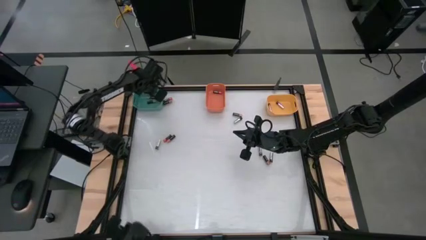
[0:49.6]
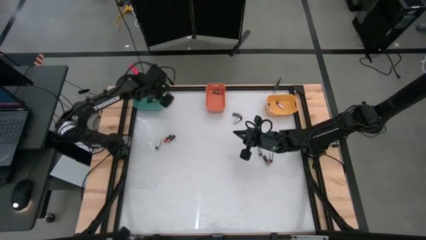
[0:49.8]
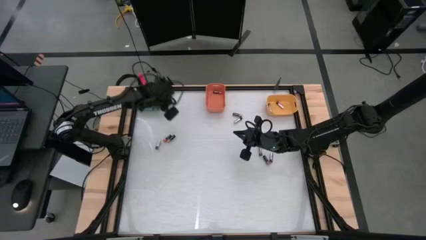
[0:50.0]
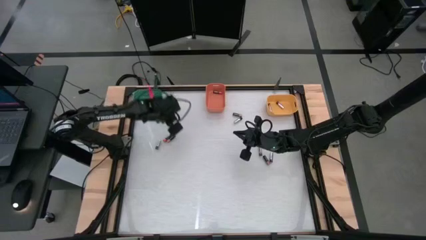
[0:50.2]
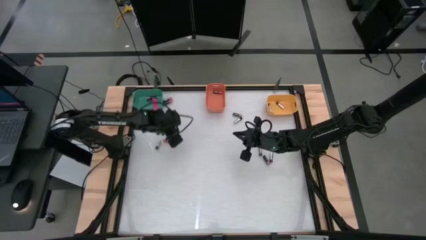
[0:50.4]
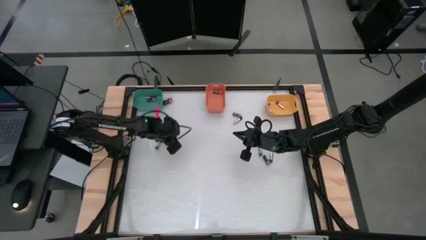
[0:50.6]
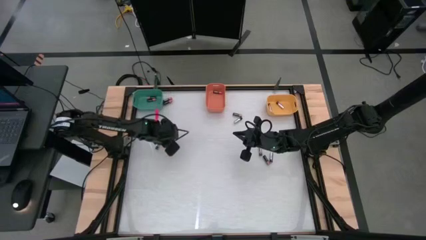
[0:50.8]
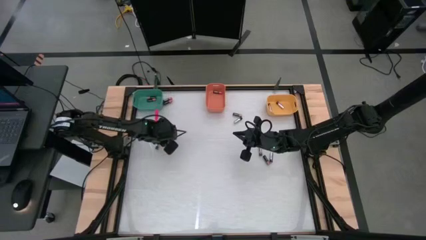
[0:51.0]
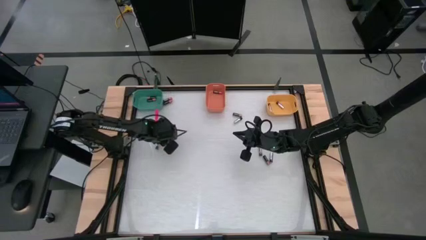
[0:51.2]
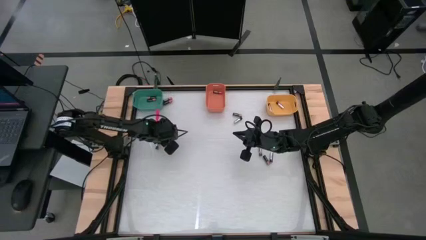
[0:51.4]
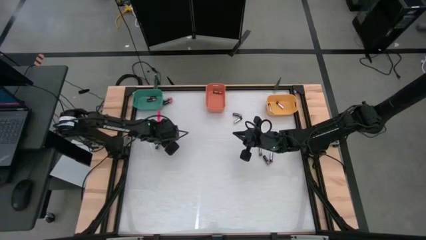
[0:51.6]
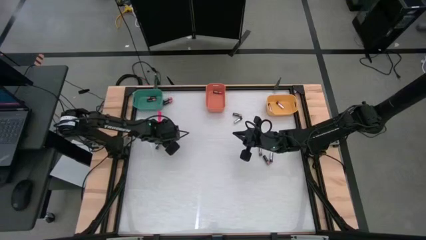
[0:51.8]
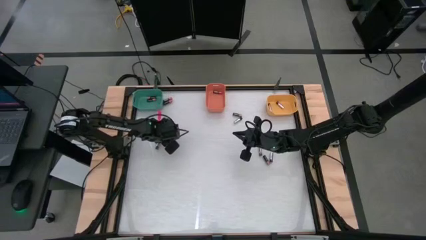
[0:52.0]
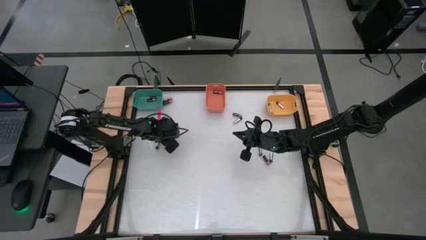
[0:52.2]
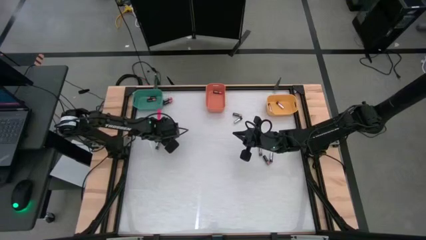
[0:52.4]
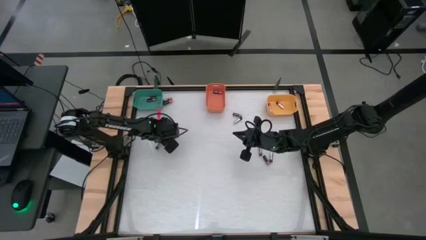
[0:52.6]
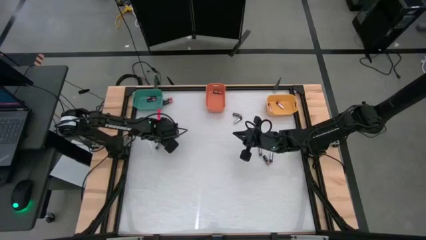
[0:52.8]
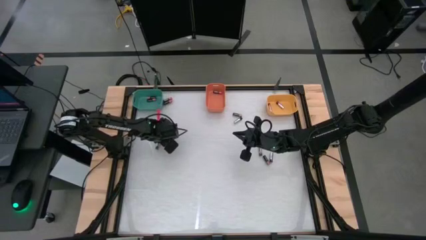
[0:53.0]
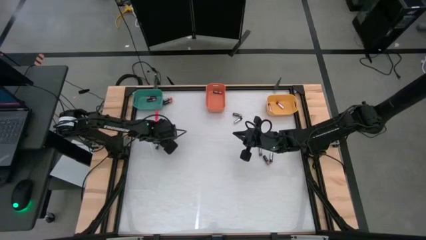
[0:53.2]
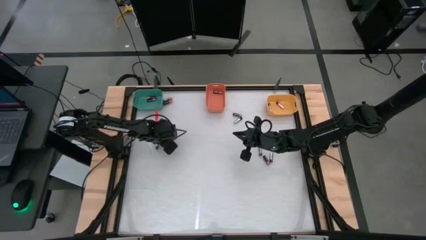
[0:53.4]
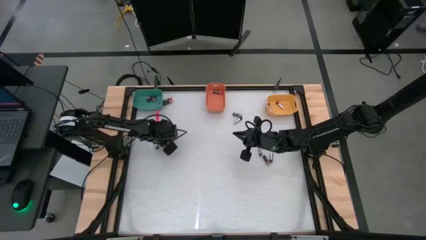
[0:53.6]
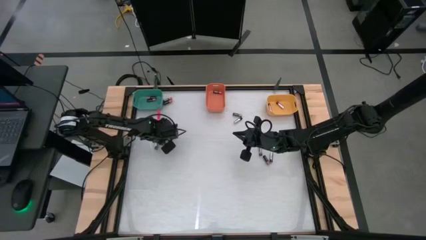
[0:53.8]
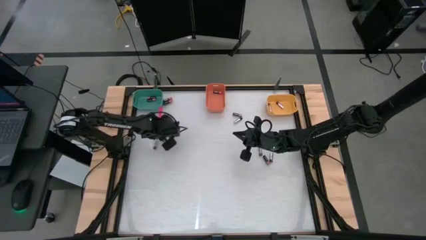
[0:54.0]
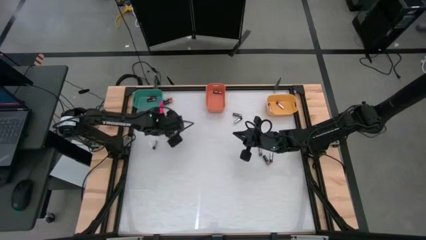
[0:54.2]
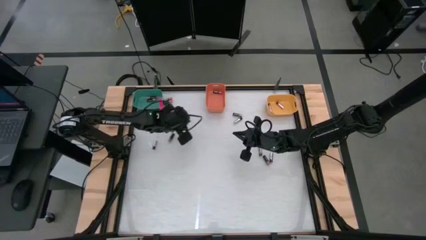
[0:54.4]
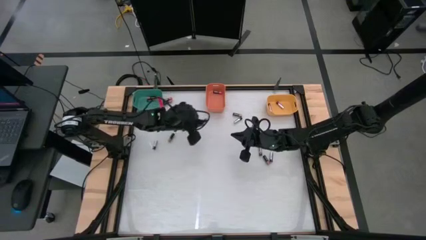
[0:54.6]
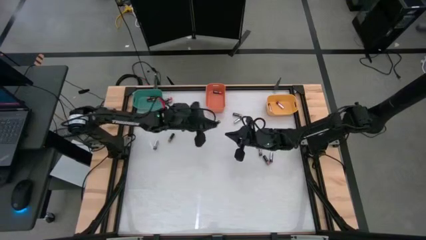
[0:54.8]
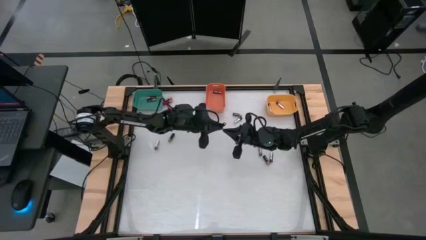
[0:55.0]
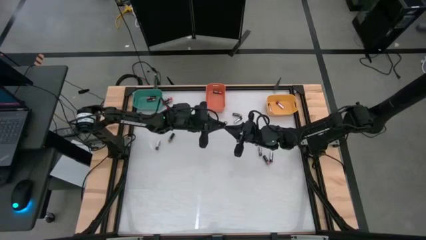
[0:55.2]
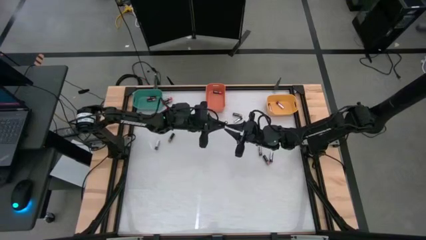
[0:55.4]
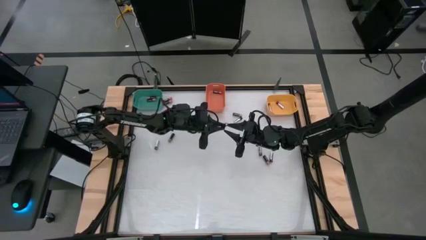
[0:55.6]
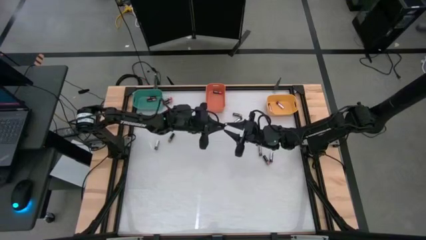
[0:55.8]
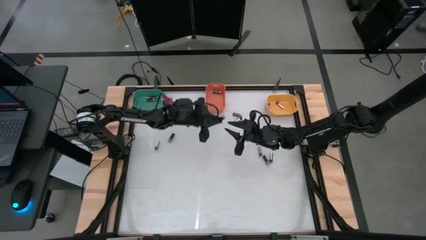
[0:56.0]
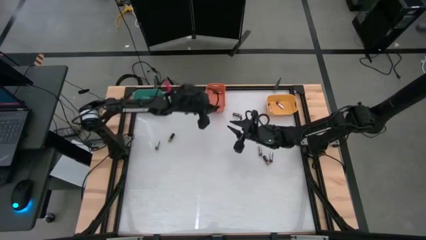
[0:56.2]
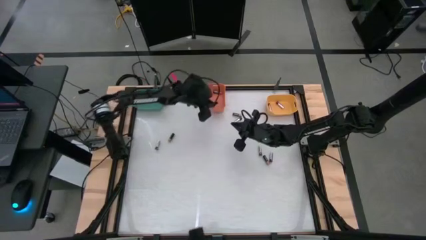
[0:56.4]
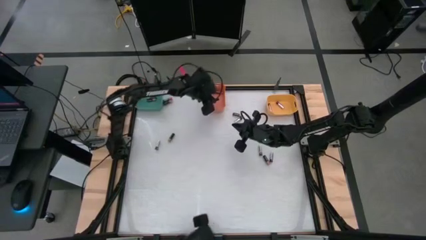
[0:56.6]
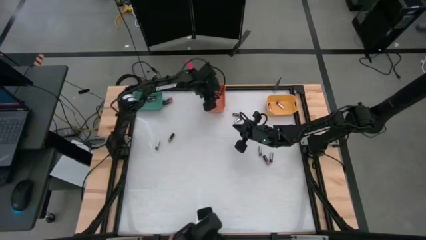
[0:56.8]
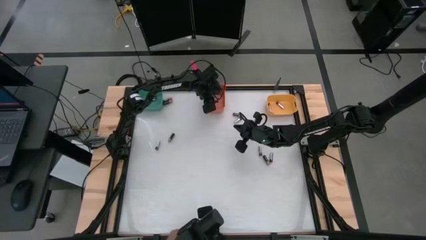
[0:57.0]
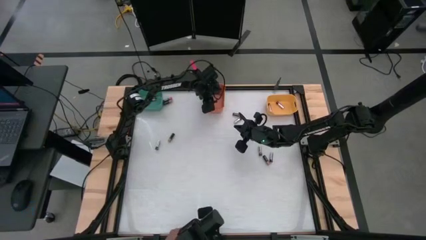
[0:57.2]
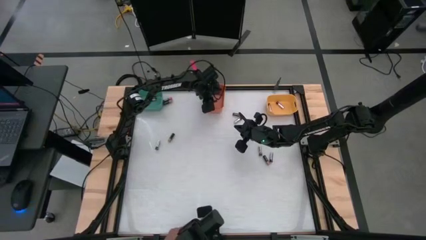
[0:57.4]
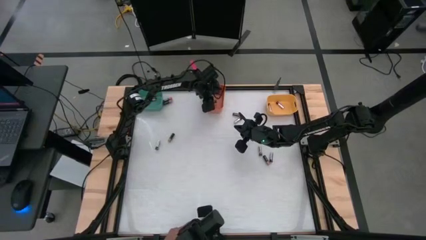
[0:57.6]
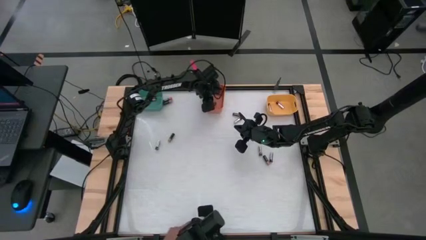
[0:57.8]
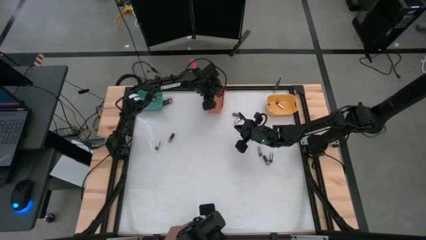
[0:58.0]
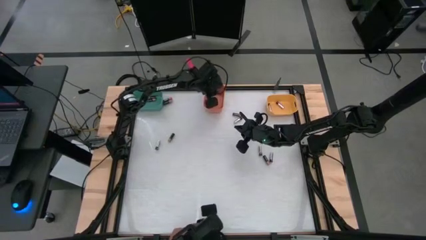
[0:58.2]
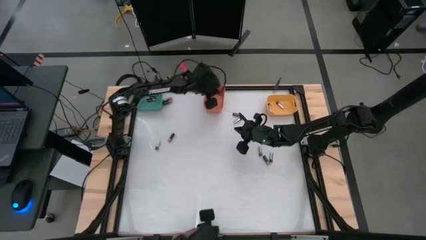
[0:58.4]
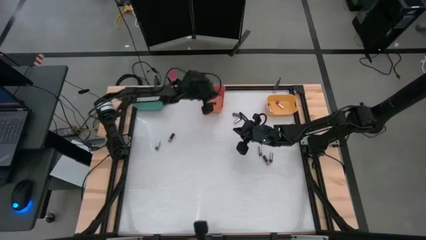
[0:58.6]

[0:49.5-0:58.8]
Task: Sort batteries
Put the bottom left red battery into the orange container

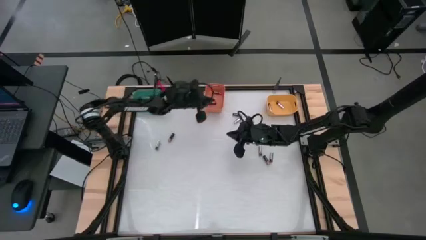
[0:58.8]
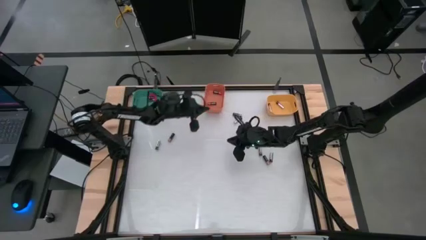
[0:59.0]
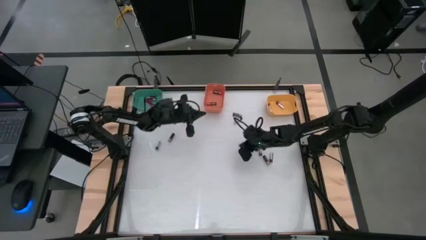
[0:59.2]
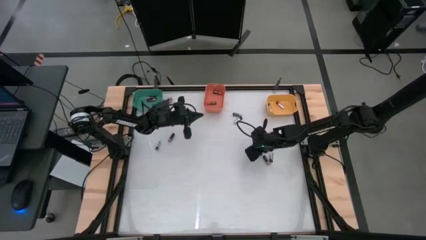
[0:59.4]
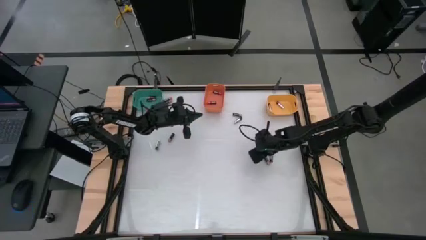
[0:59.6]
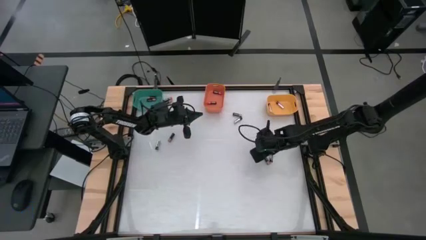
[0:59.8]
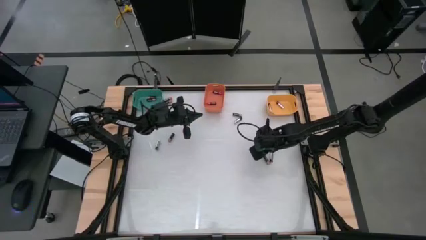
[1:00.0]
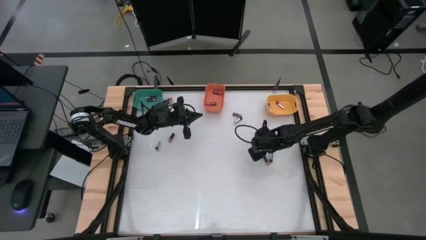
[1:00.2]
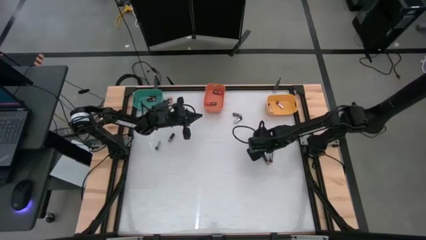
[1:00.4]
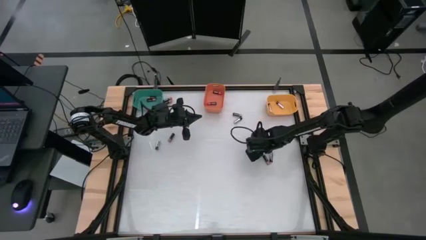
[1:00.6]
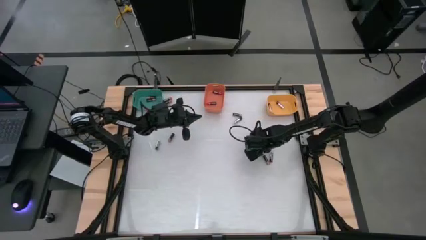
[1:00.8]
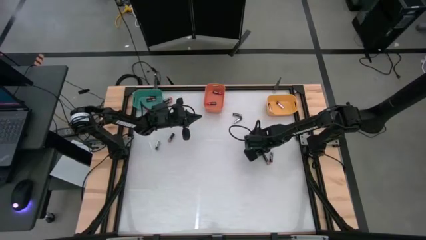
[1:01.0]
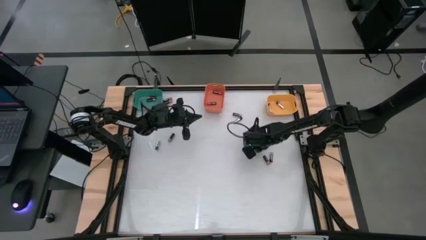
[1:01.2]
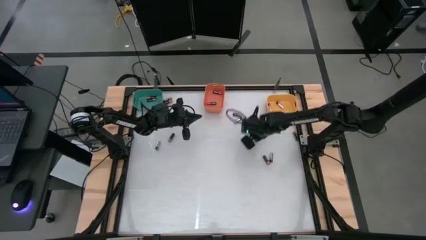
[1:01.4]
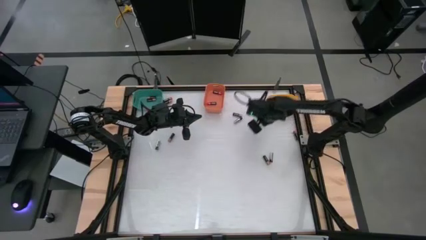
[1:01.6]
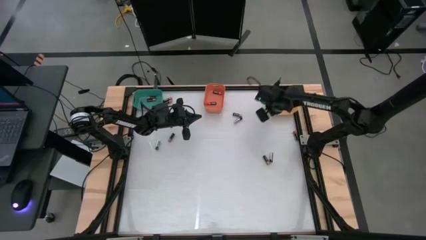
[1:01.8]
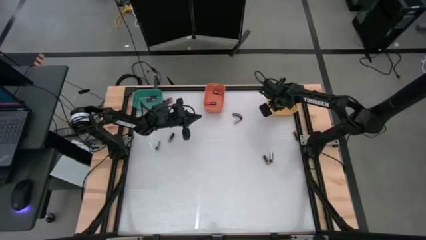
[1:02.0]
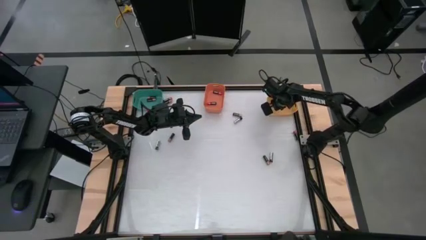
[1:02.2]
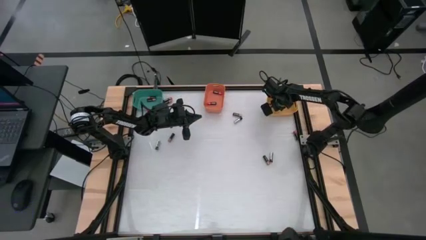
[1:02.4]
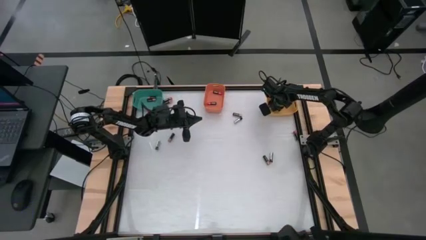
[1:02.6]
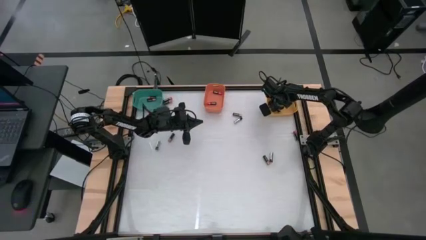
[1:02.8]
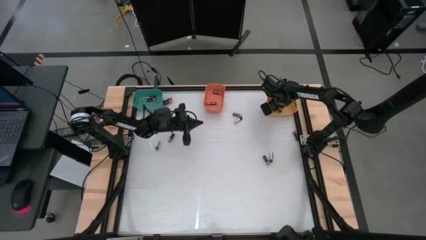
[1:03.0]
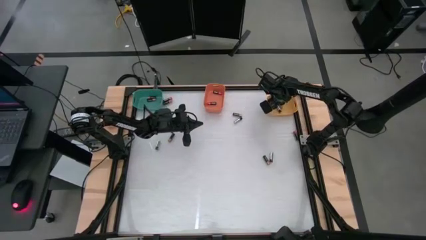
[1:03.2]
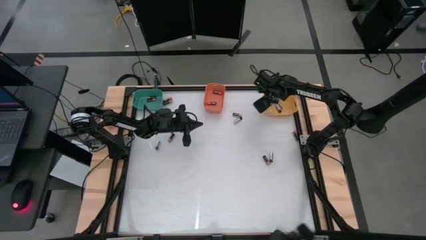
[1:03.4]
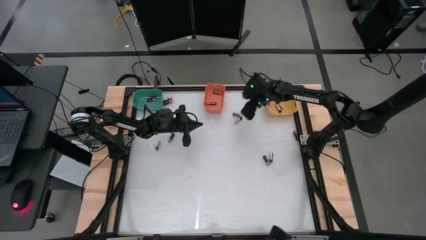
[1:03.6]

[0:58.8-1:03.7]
Put the bottom right silver battery into the yellow container

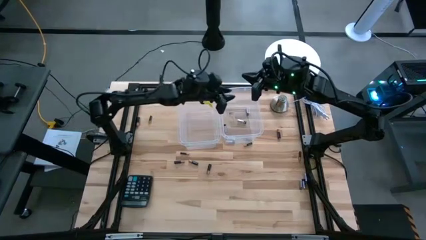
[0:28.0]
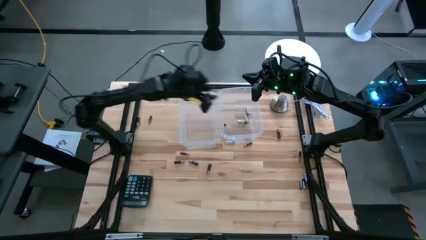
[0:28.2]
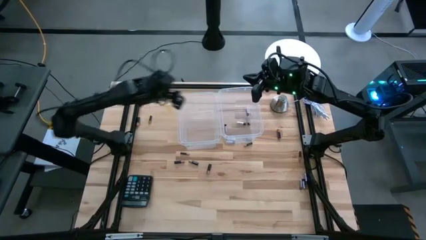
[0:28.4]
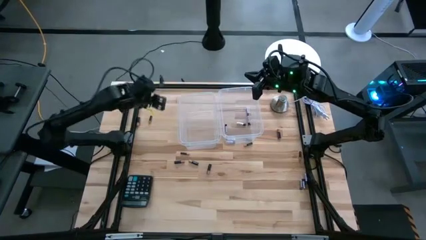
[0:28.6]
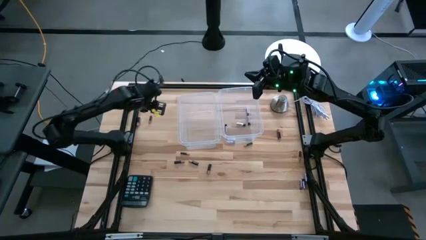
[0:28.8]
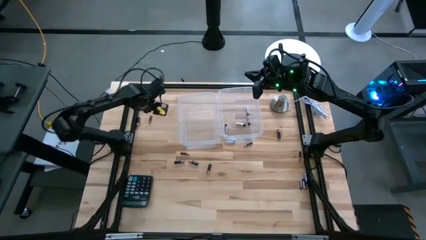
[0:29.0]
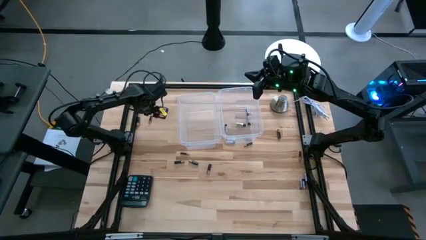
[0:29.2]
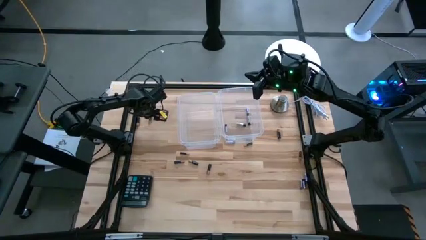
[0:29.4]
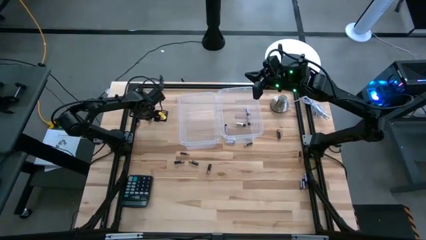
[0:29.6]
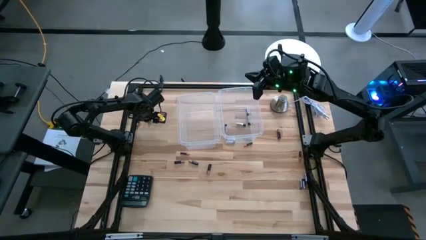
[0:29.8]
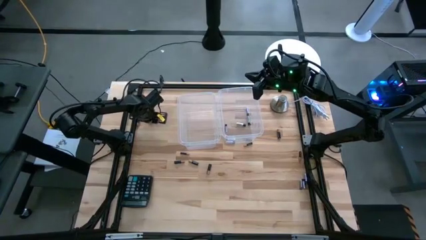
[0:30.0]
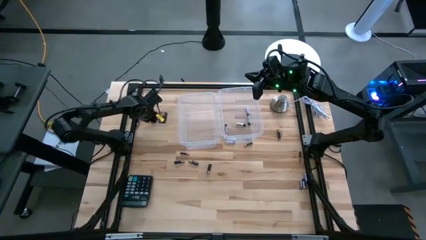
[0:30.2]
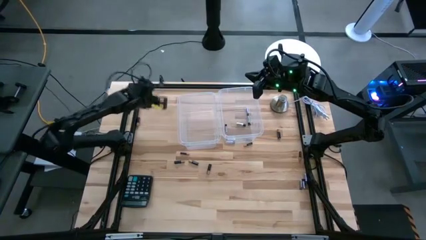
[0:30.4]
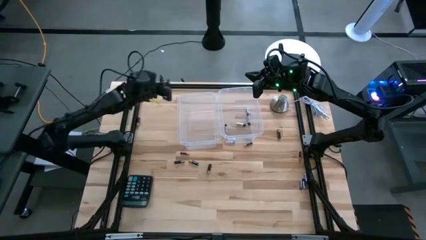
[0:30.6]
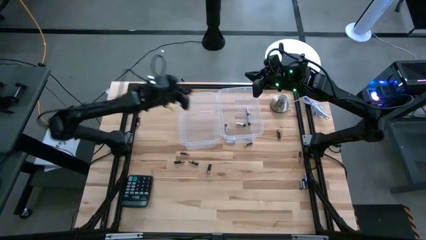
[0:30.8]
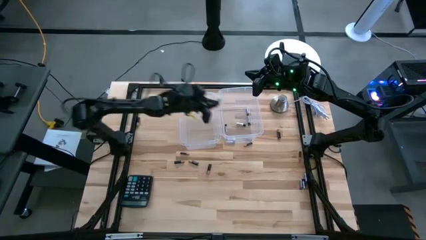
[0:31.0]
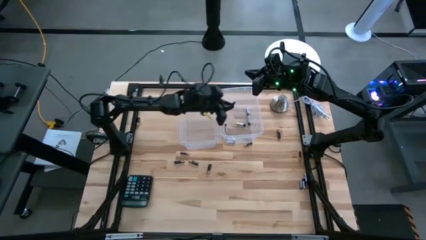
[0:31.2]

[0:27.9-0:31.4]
Task: Sort batteries
Put black battery into the left transparent bin
